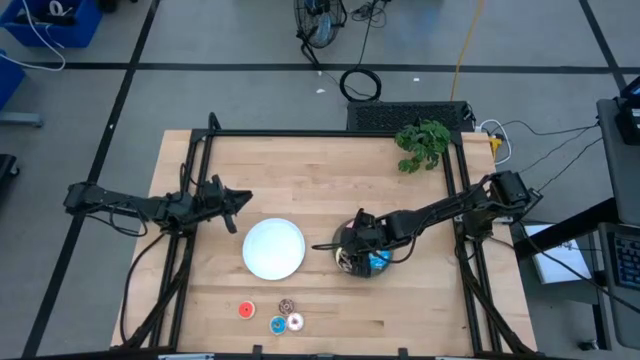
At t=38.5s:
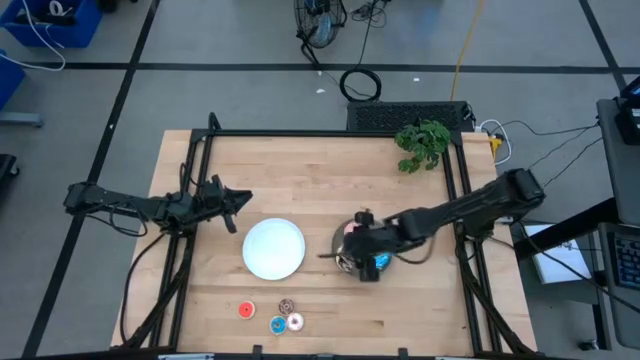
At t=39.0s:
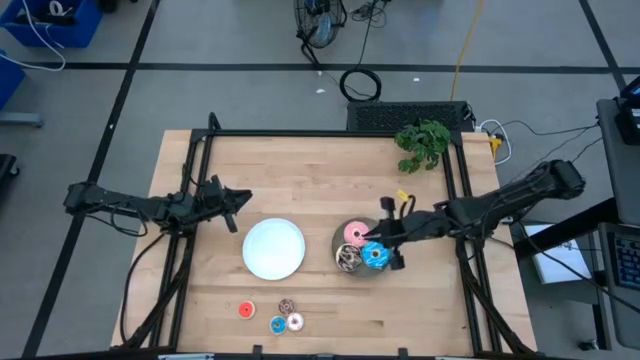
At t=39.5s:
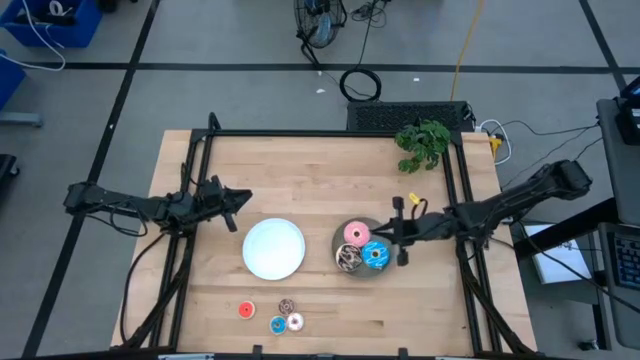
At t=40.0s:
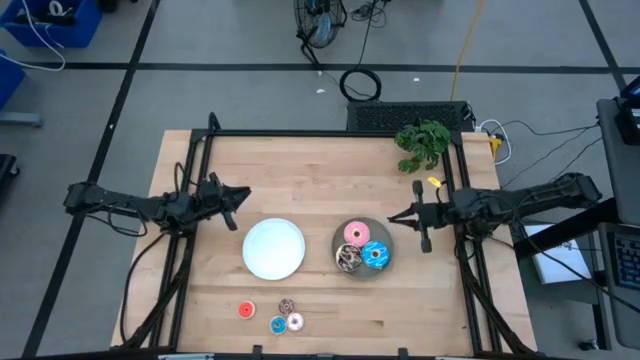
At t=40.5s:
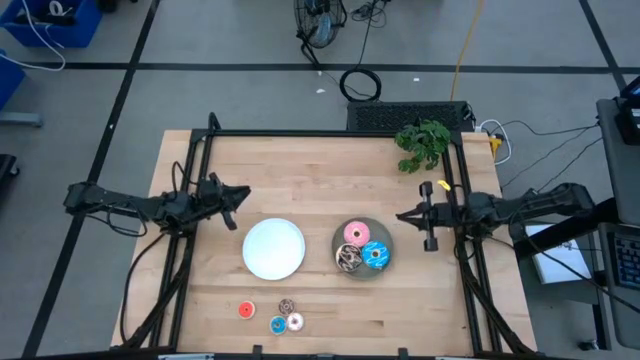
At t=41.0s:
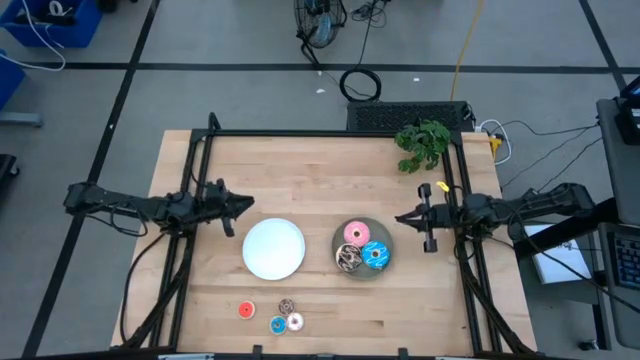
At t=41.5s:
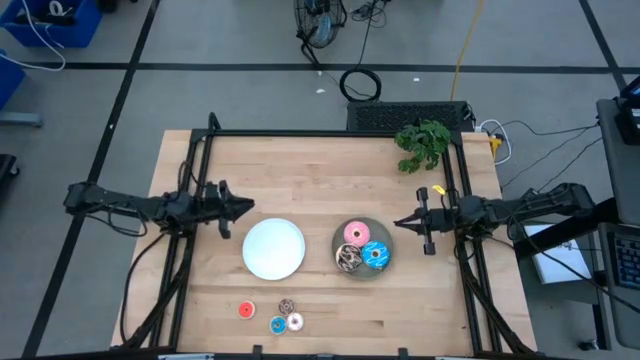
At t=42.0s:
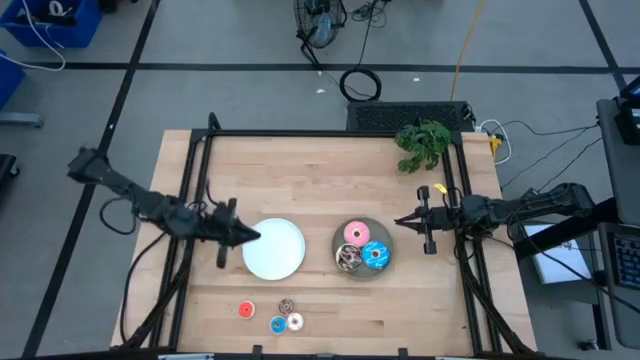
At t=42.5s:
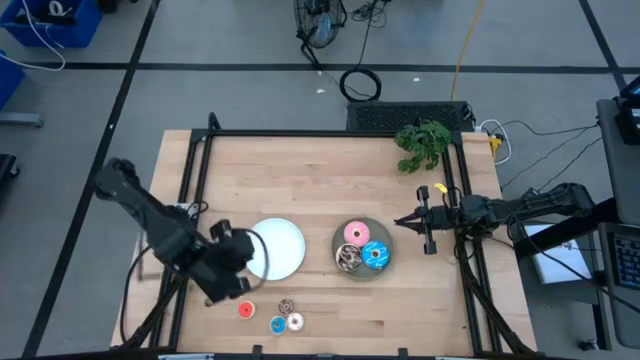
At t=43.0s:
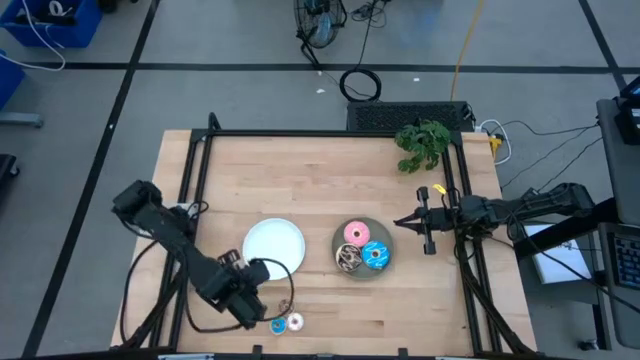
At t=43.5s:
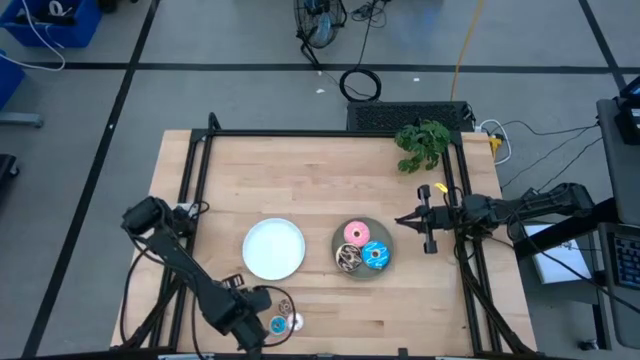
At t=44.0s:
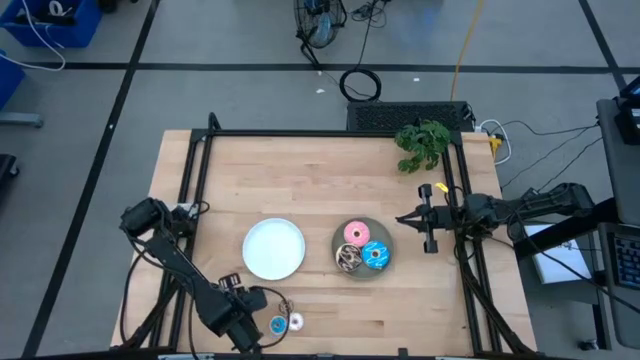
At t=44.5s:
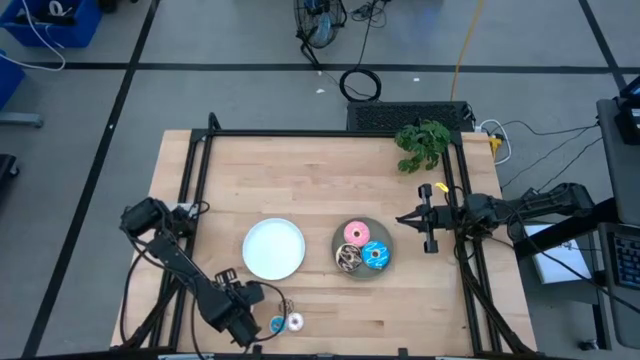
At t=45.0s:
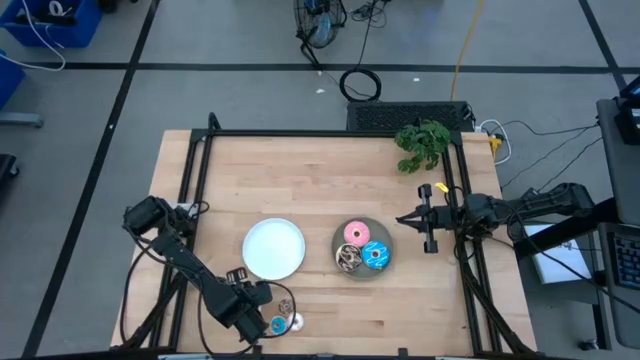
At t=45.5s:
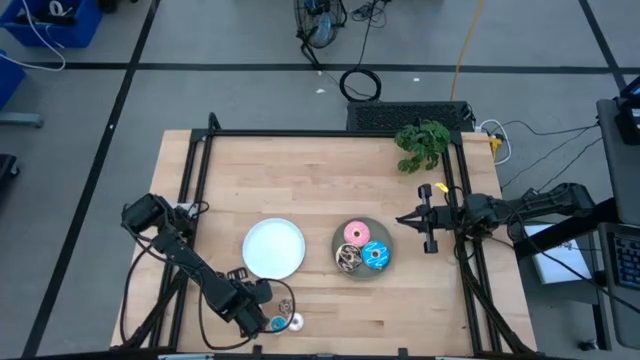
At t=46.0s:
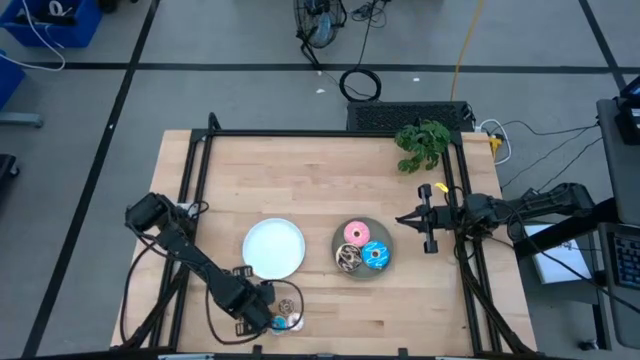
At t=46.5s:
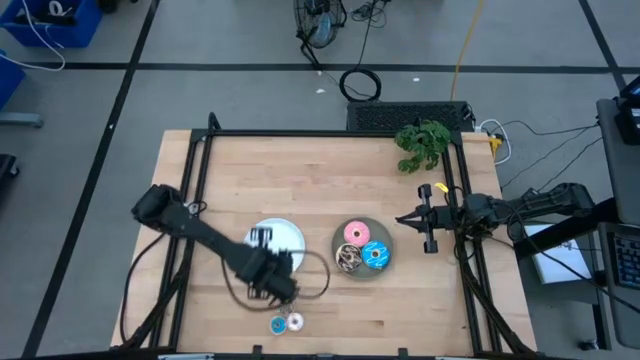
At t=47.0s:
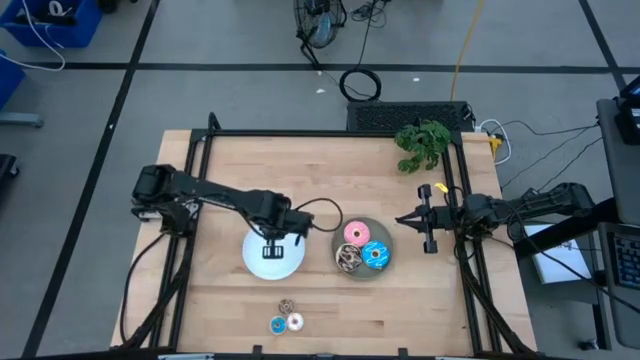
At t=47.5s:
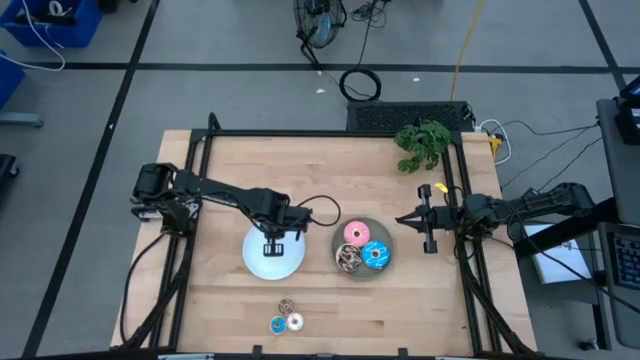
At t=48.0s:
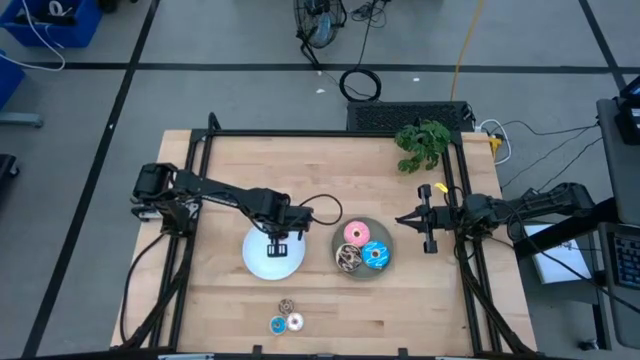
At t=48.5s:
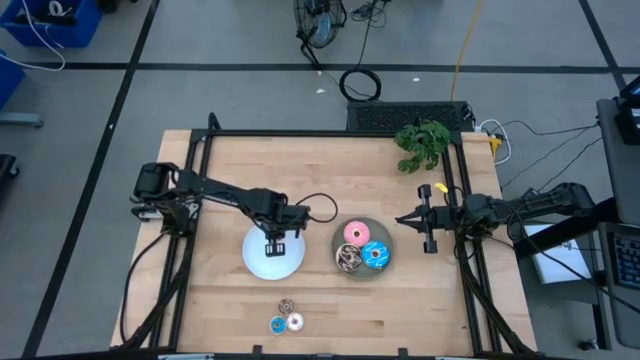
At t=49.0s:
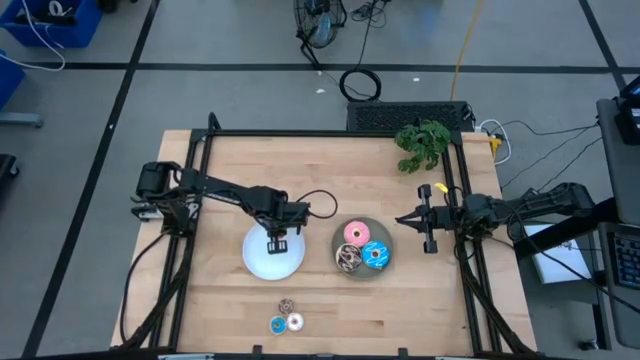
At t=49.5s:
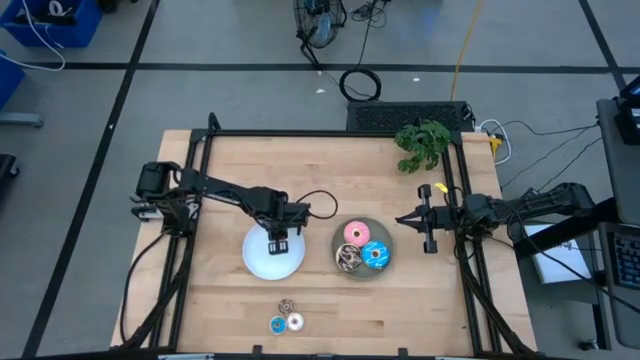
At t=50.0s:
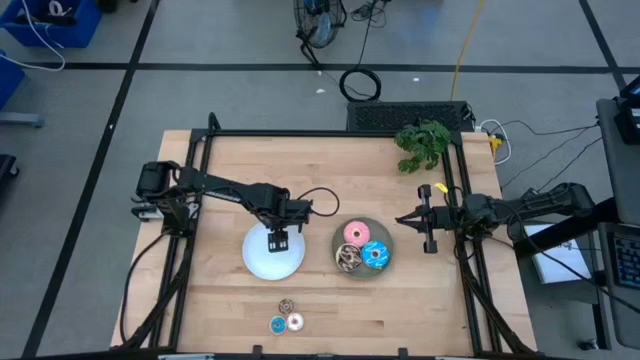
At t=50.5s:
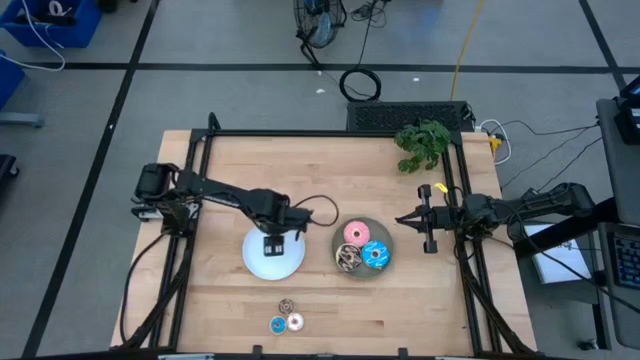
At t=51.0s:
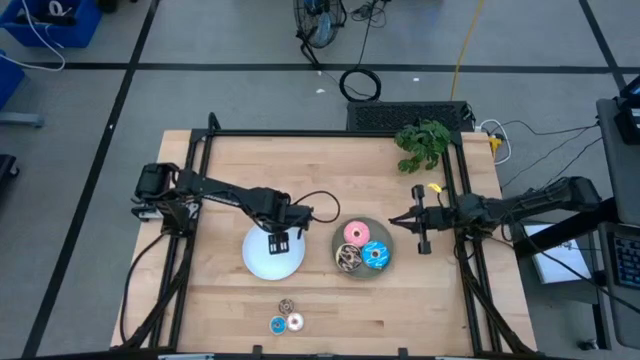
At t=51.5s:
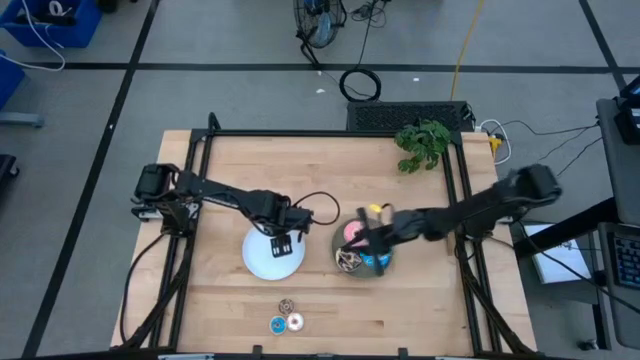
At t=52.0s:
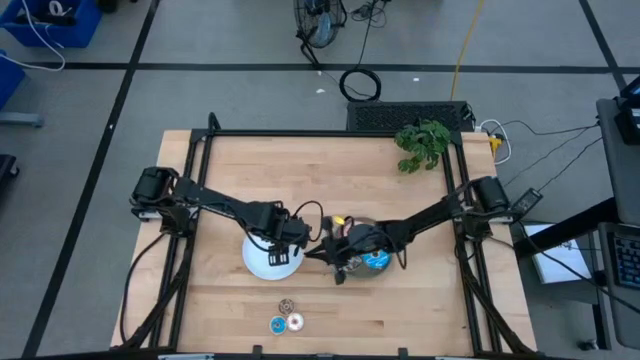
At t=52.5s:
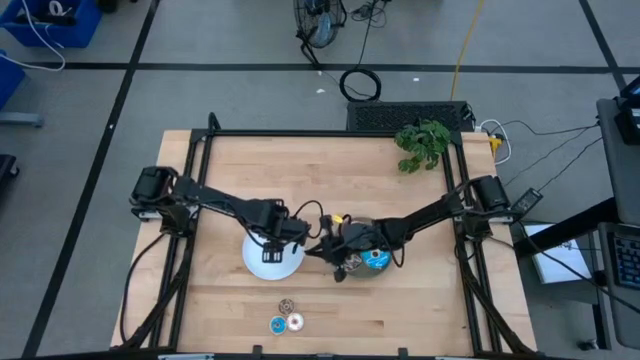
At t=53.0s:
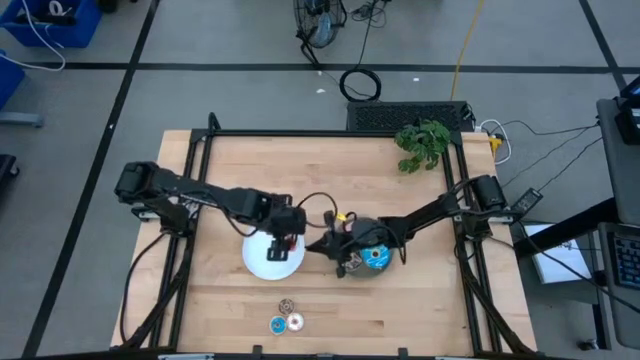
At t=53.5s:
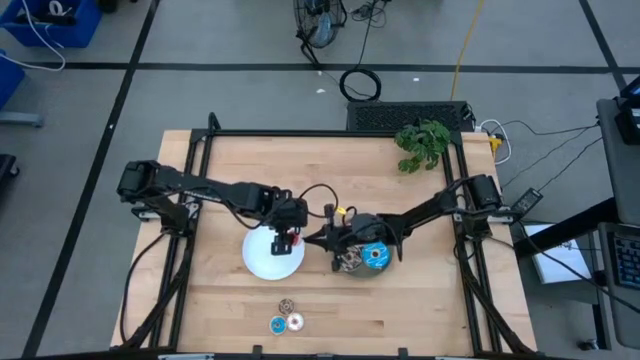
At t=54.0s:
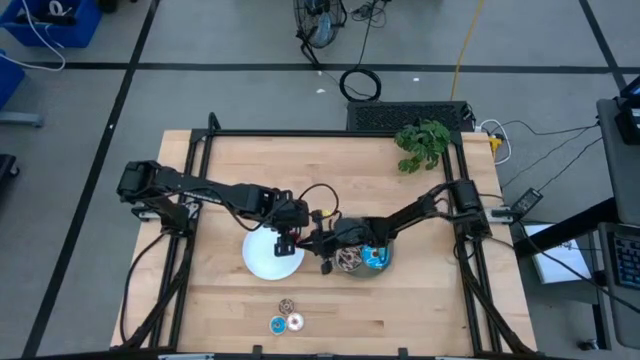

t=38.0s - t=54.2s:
Task: Pick & Place donuts
Put the small orange donut on the white plate

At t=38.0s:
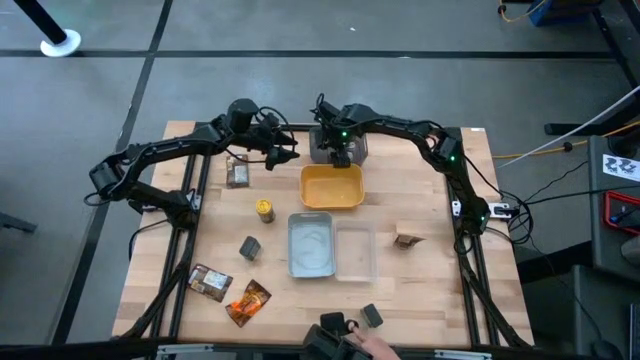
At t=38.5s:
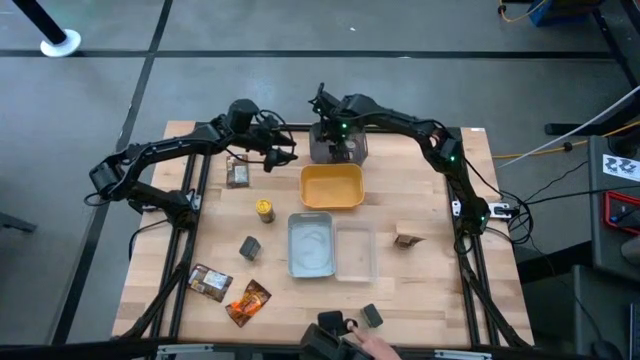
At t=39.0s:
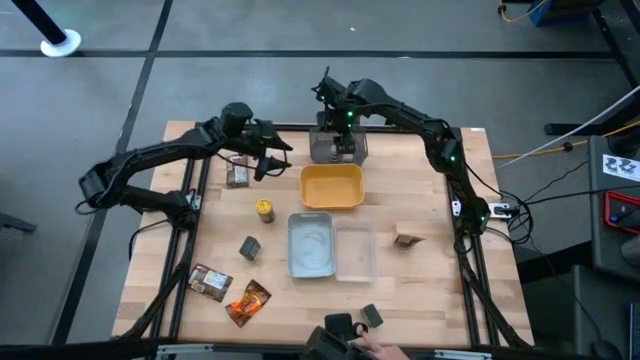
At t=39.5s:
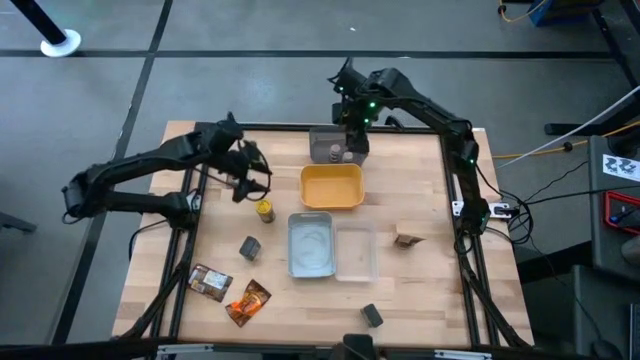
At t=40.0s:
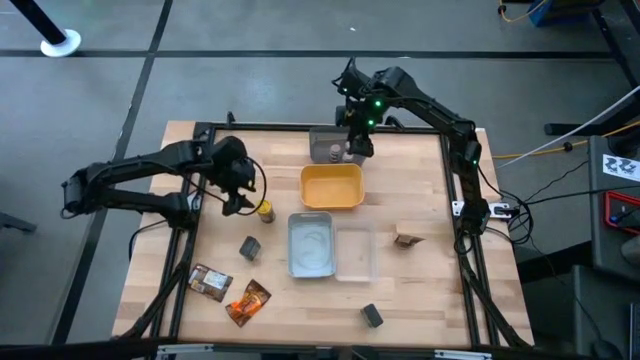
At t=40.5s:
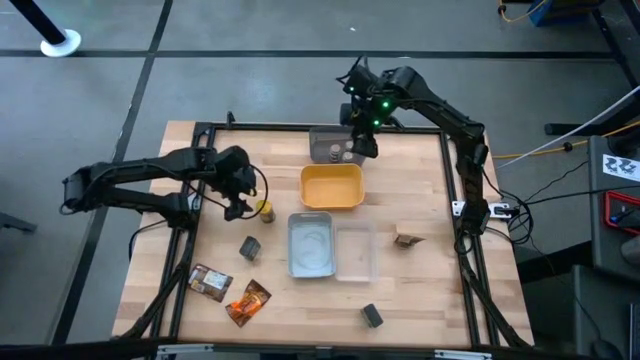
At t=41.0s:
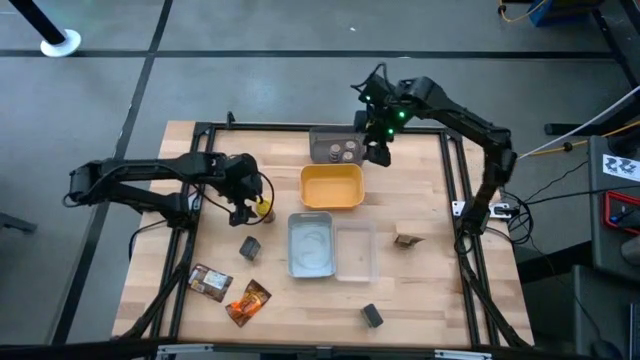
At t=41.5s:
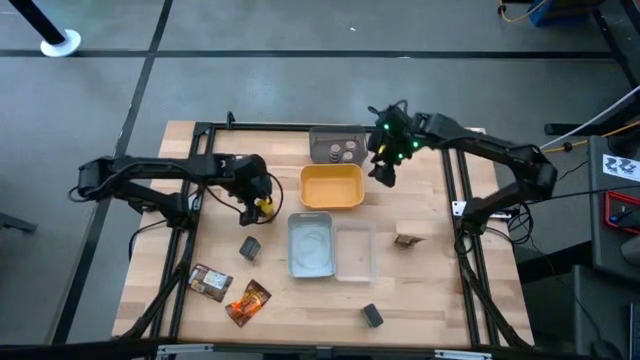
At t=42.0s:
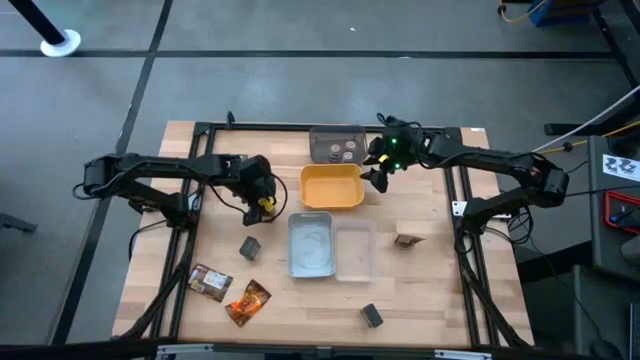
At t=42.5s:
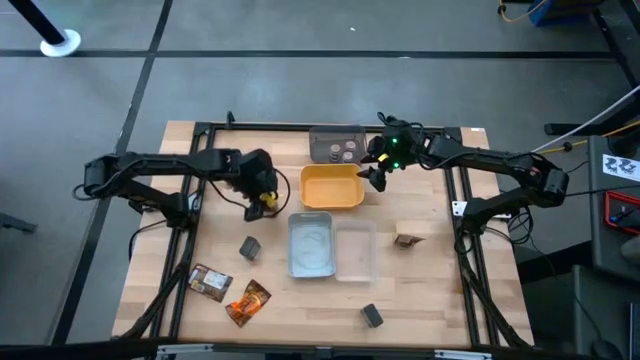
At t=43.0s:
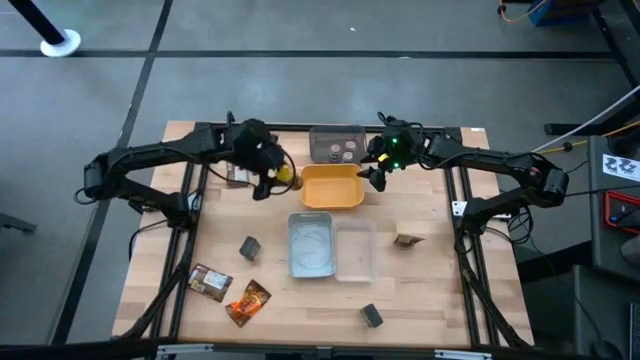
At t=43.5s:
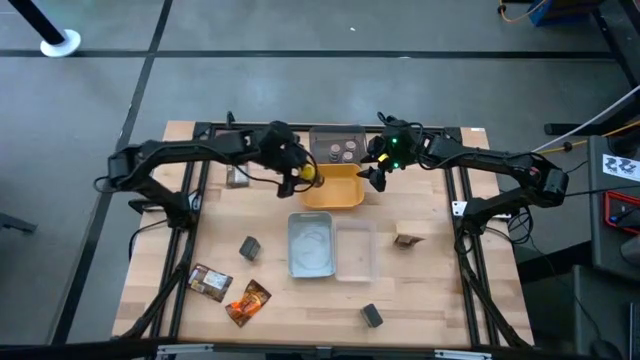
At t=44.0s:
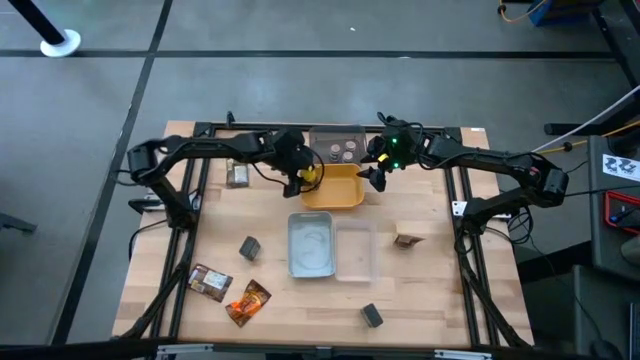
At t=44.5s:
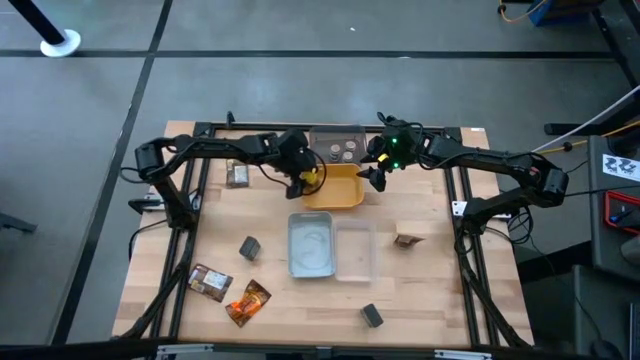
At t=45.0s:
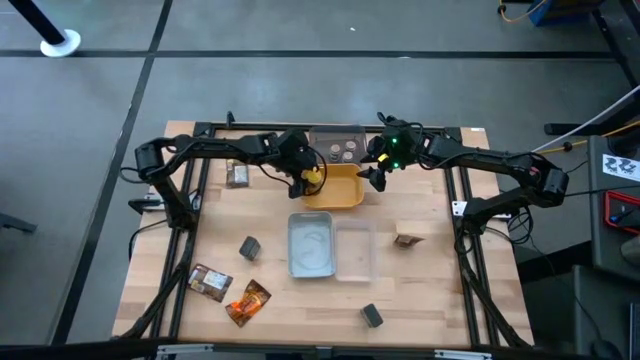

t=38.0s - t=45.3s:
Task: Sort spices by type
Put the yellow seasoning bottle into the yellow bin
